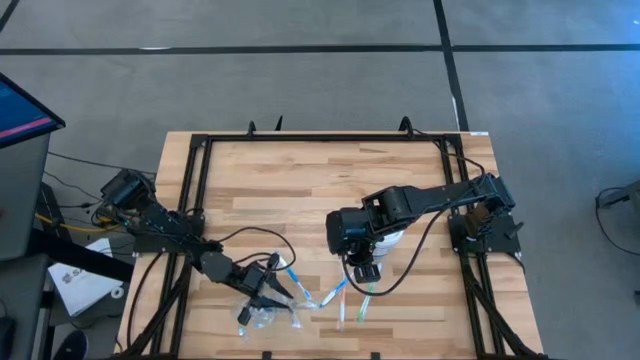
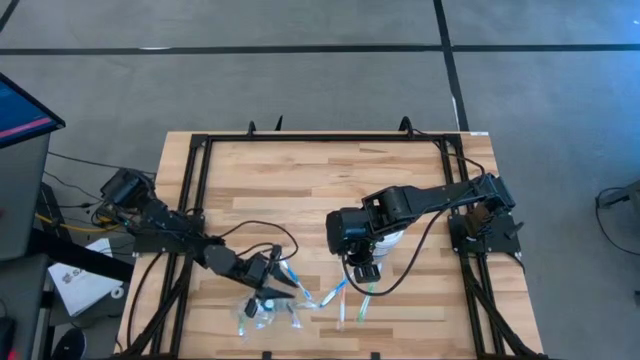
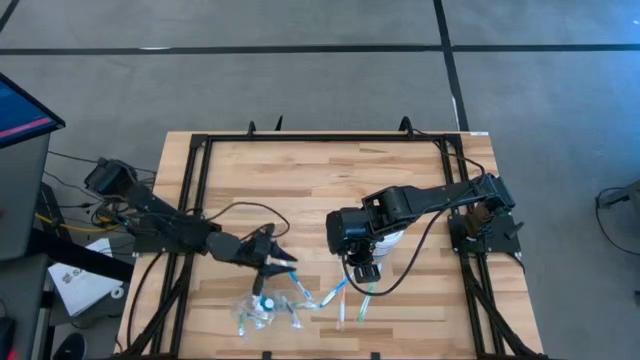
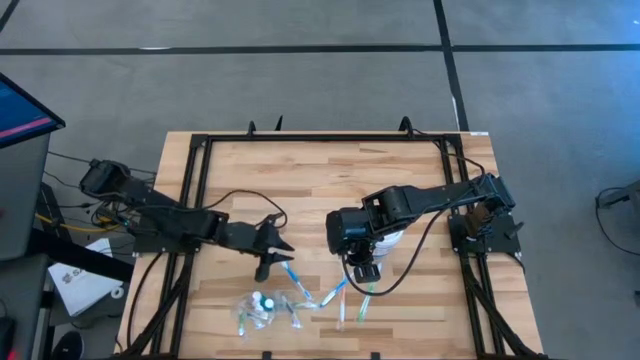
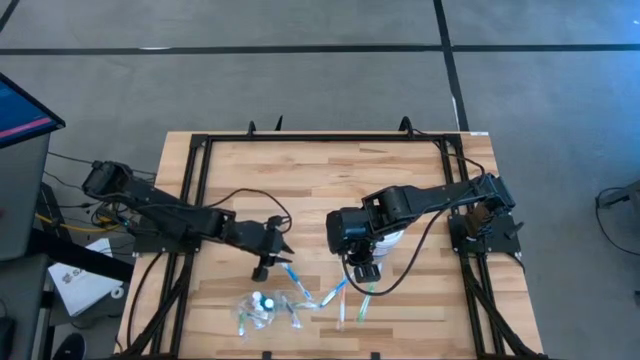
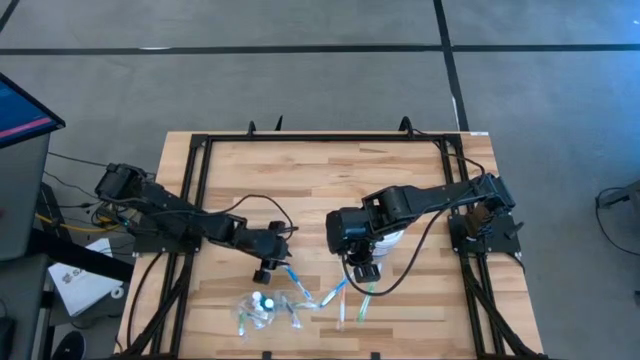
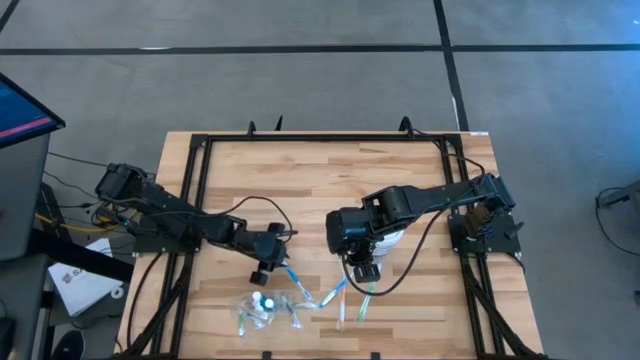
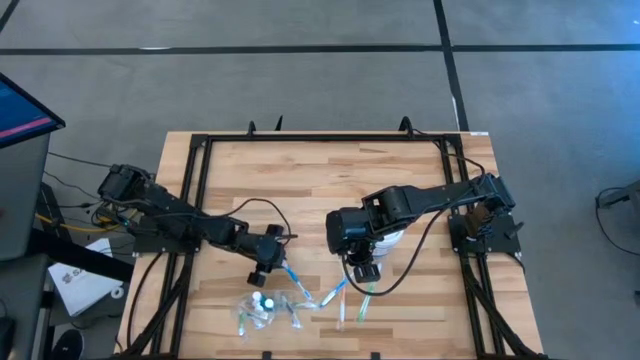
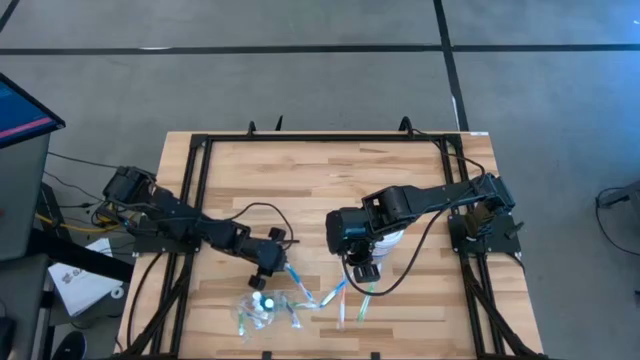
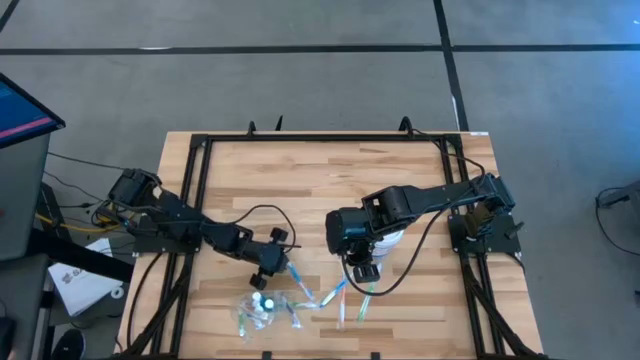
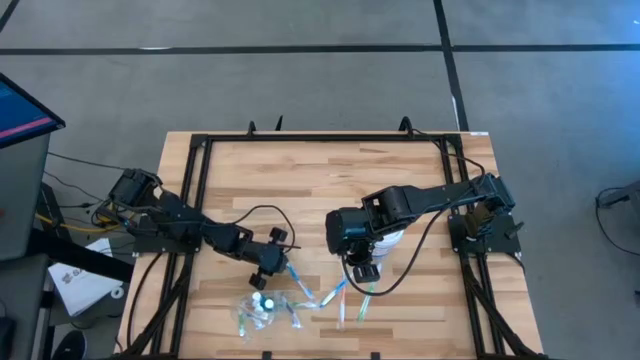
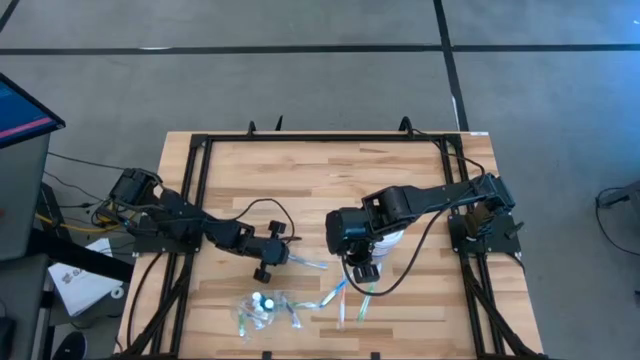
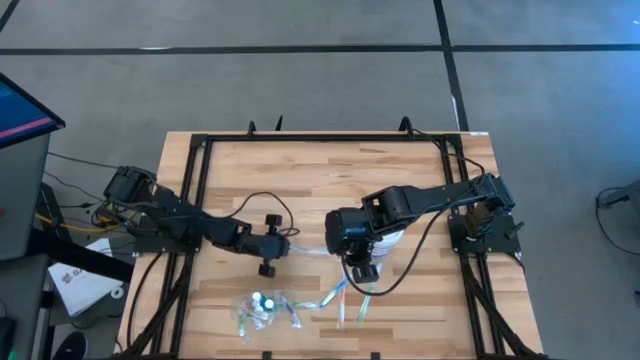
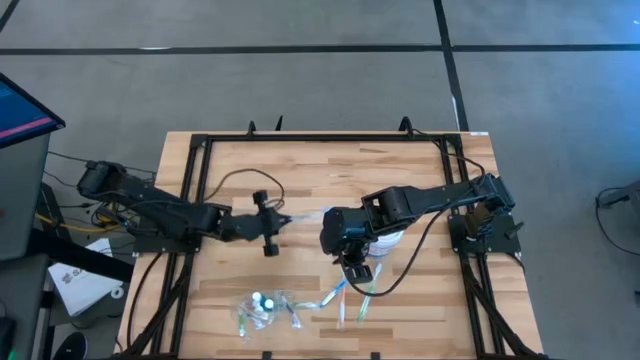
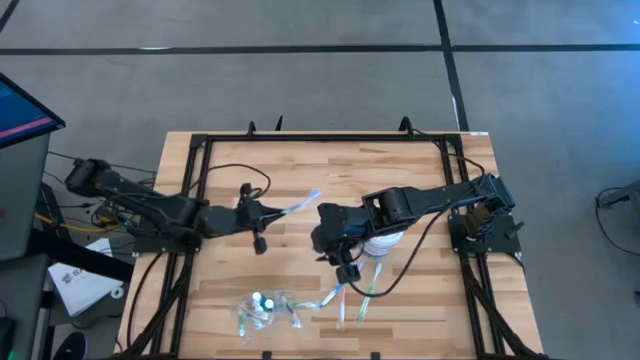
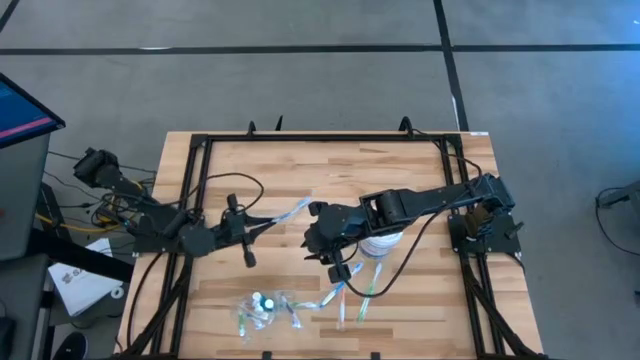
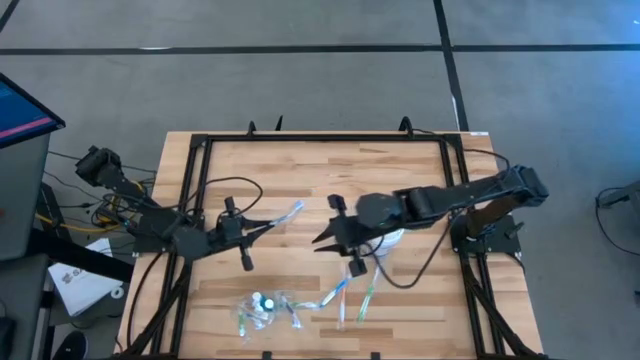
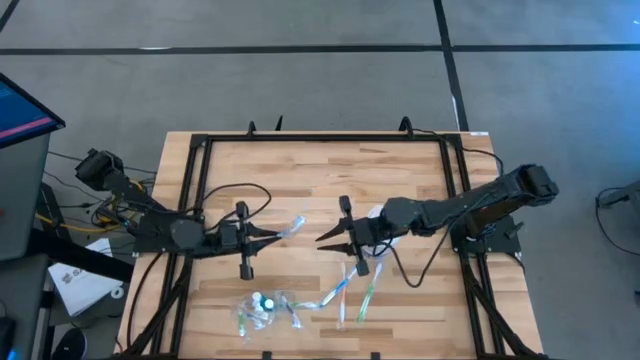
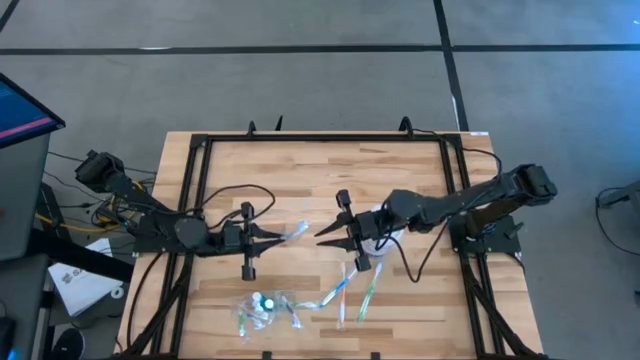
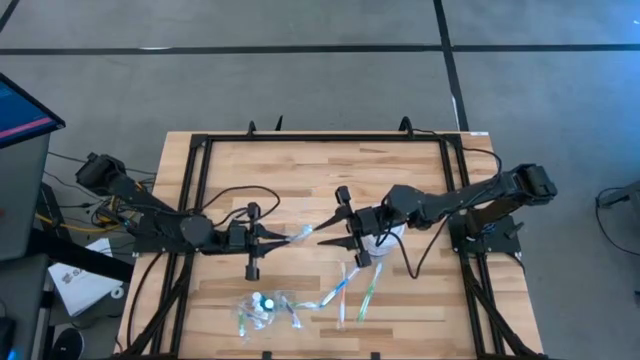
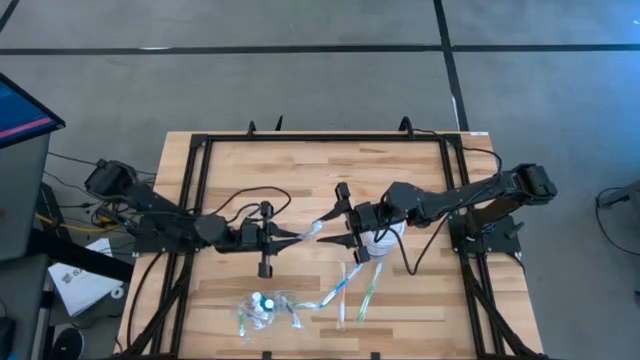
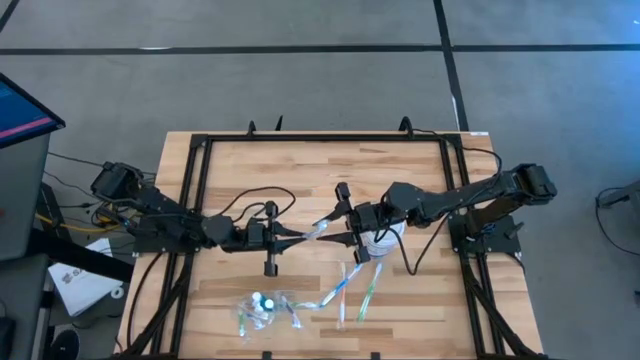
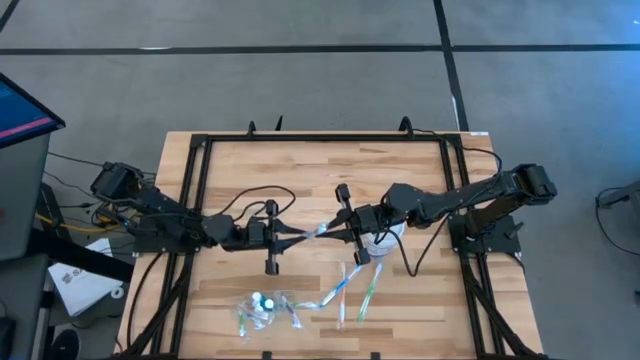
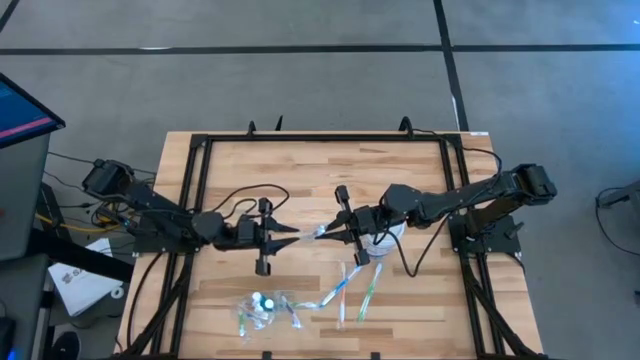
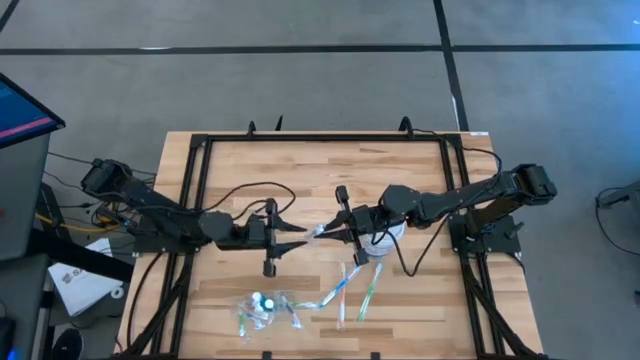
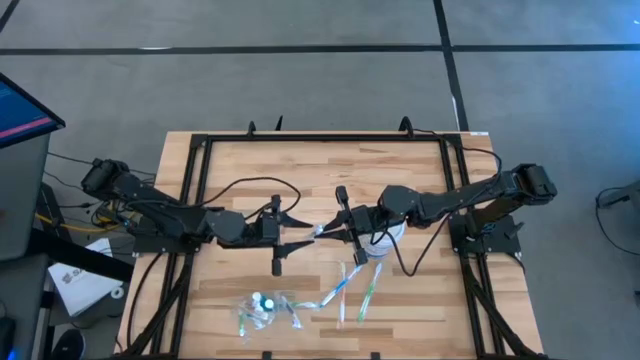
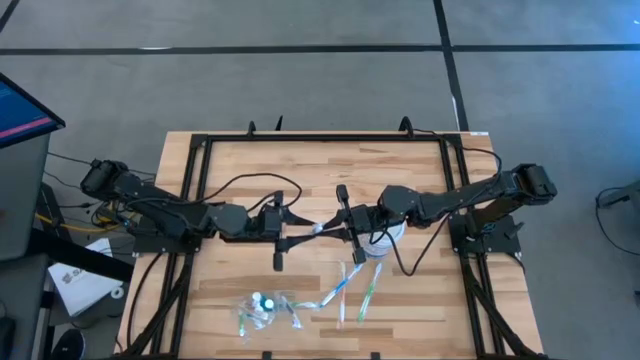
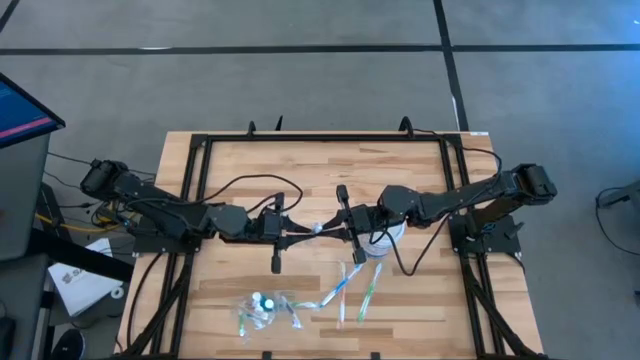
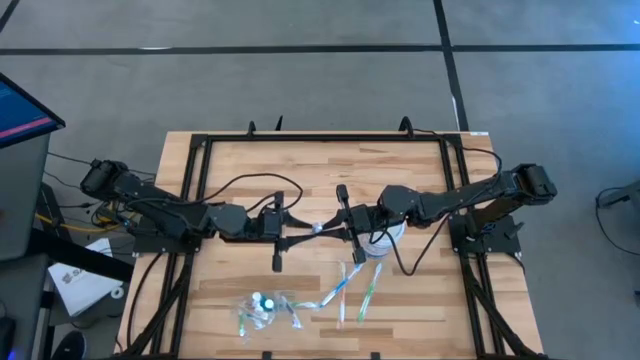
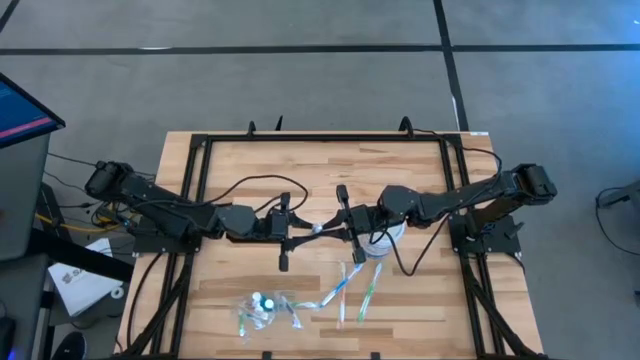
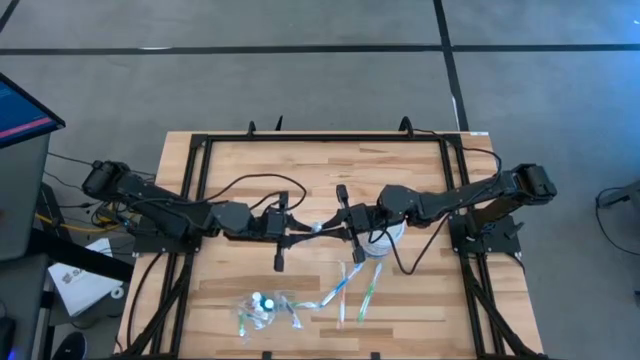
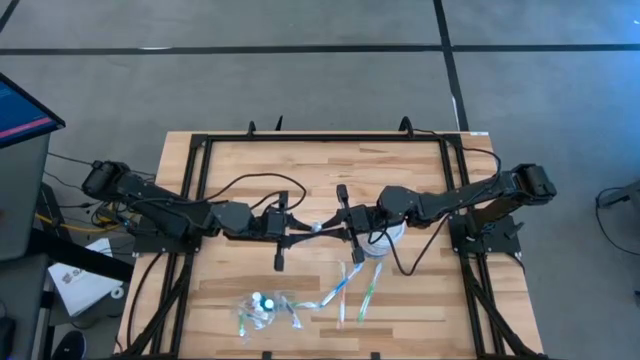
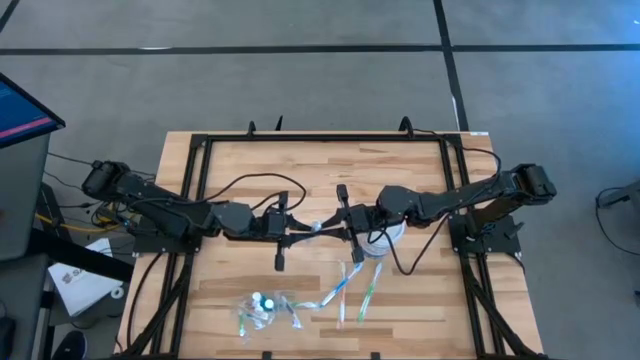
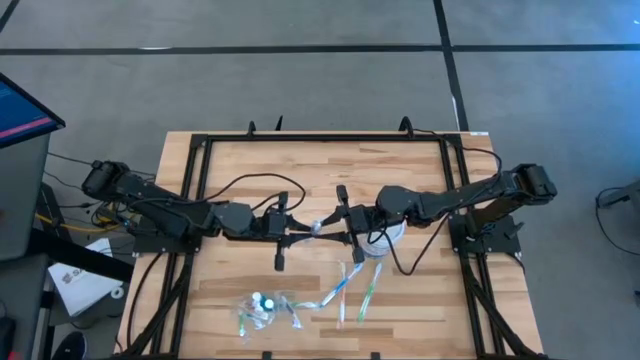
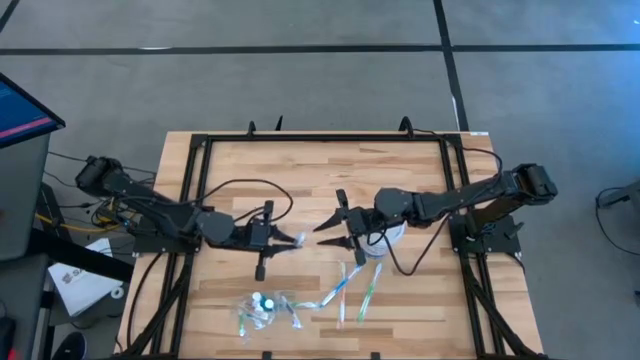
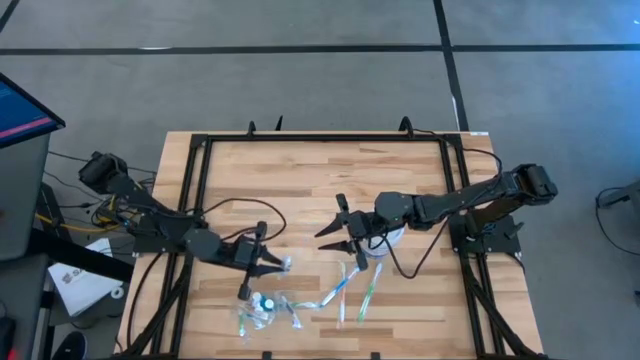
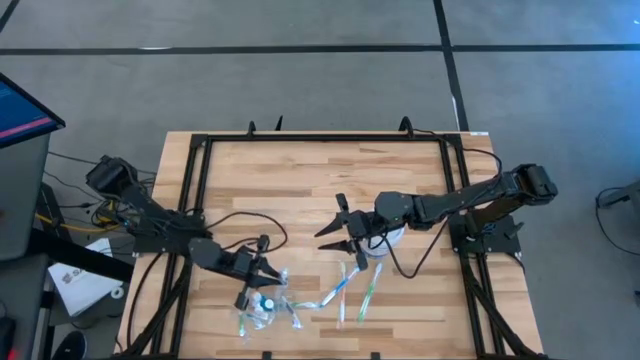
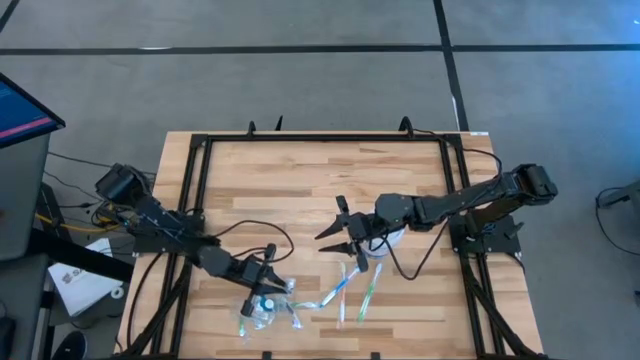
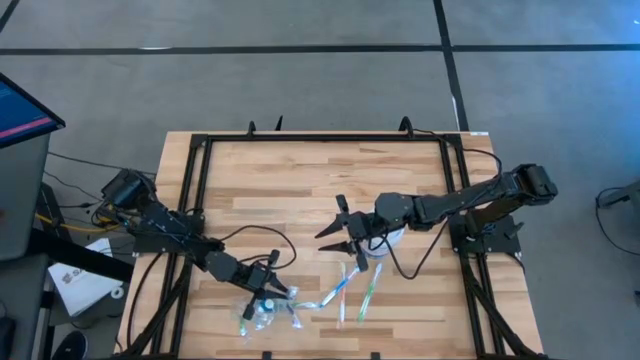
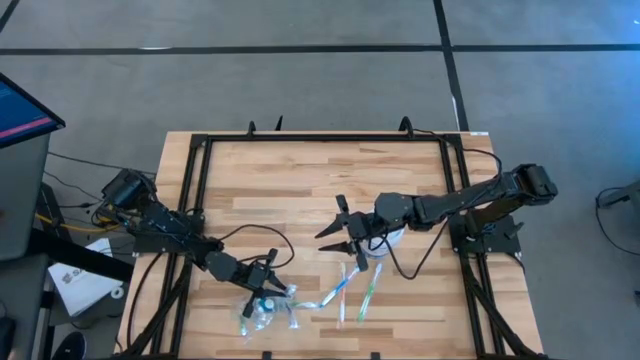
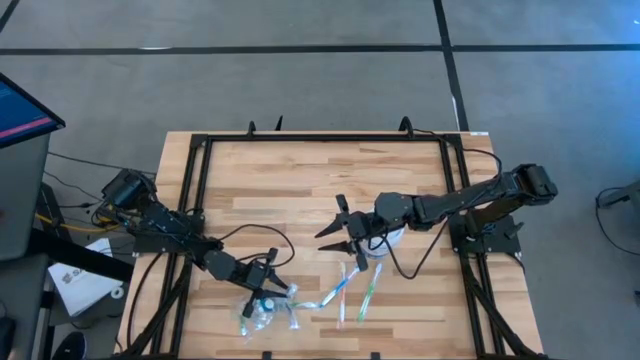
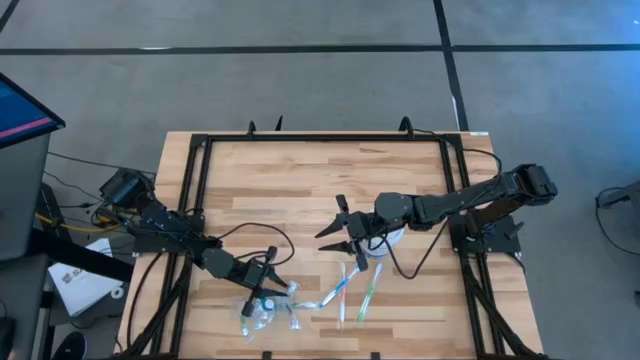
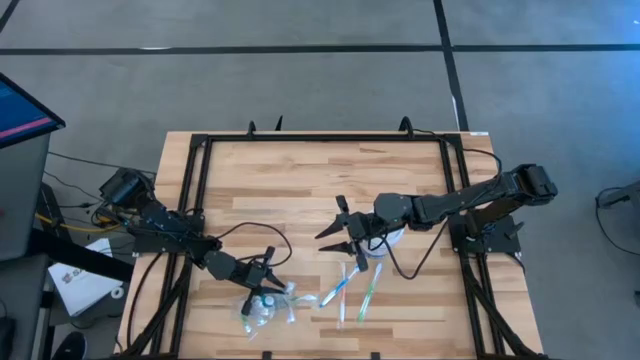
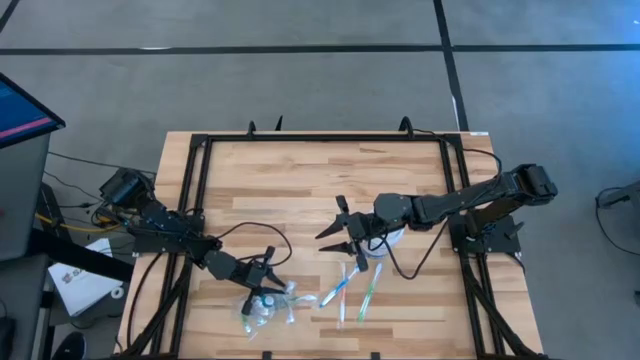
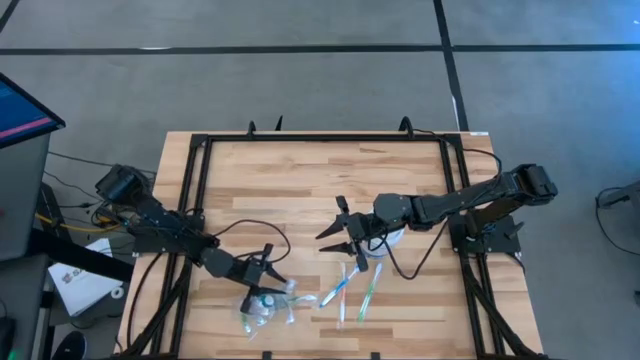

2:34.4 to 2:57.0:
Task: Pick & Place toothbrushing station
Put the left blue toothbrush into the transparent organizer
